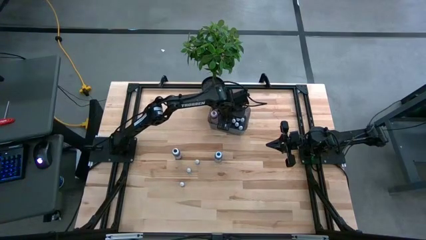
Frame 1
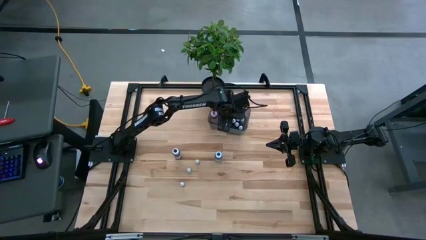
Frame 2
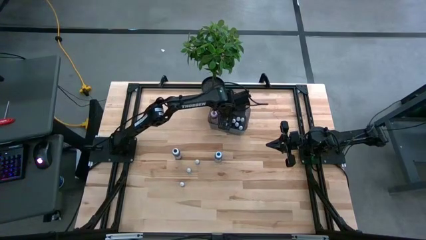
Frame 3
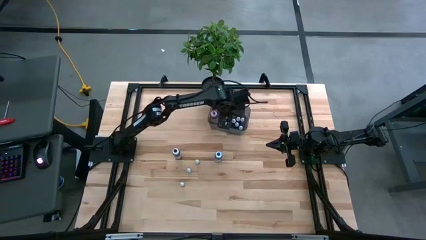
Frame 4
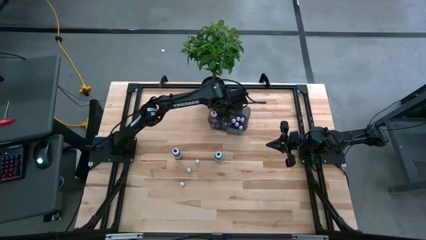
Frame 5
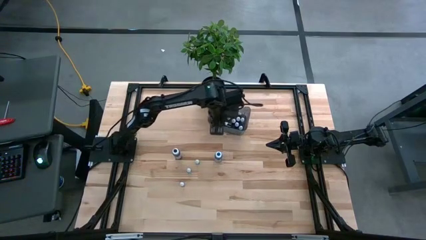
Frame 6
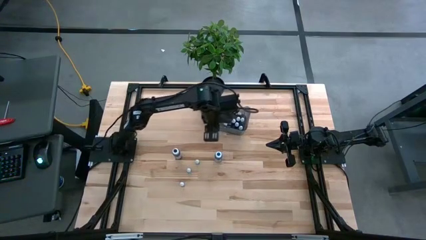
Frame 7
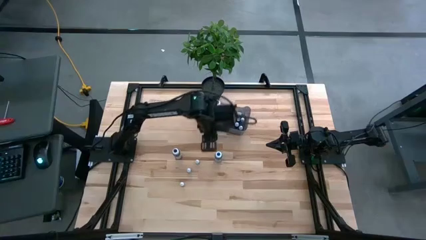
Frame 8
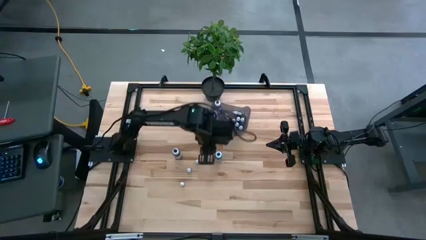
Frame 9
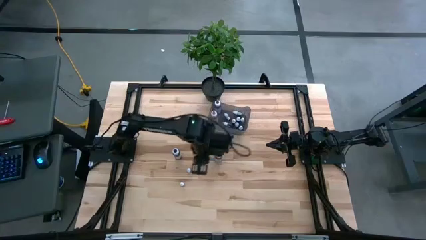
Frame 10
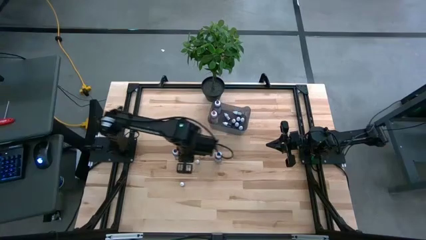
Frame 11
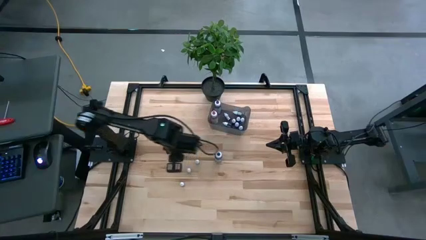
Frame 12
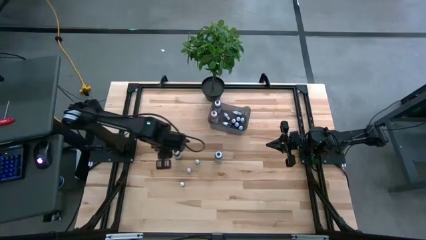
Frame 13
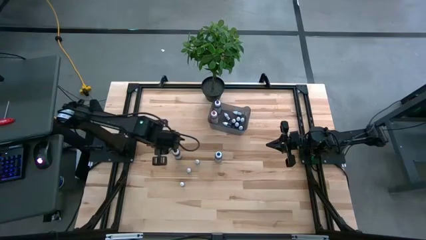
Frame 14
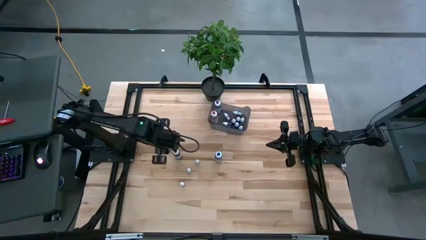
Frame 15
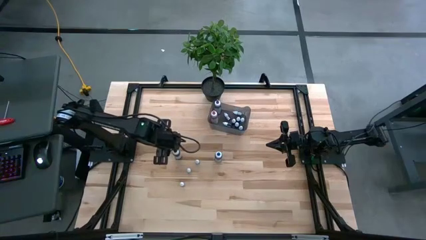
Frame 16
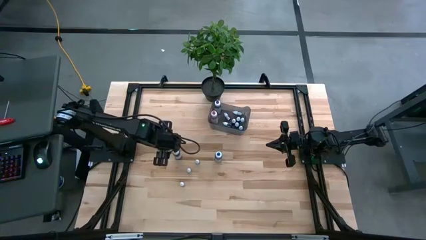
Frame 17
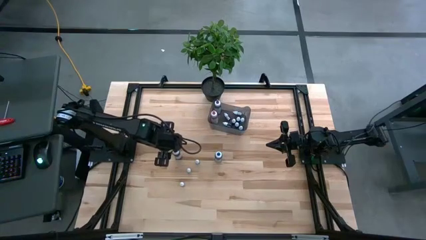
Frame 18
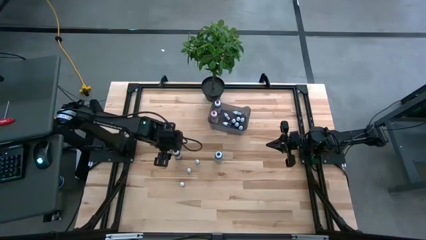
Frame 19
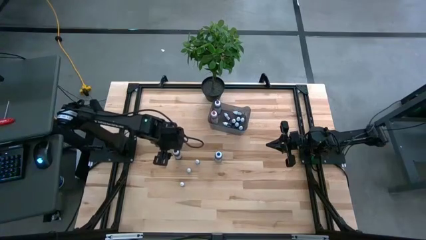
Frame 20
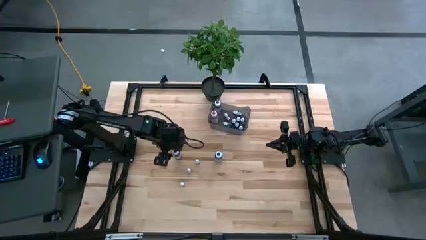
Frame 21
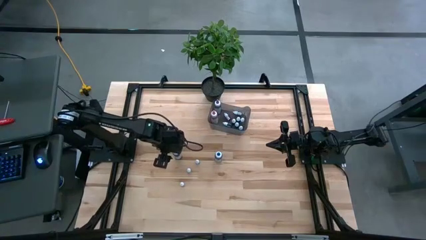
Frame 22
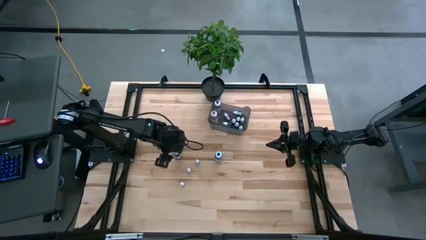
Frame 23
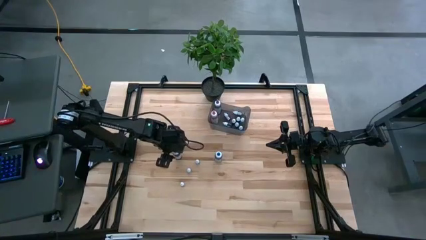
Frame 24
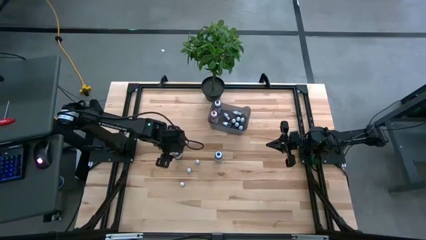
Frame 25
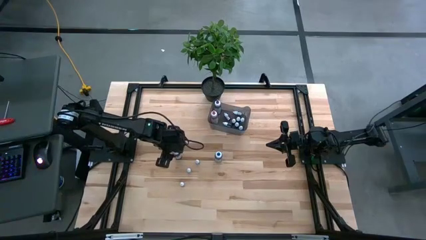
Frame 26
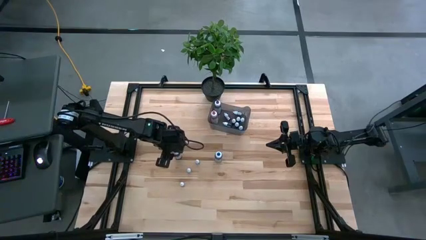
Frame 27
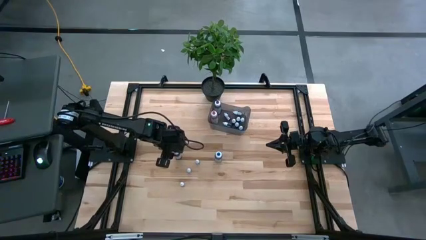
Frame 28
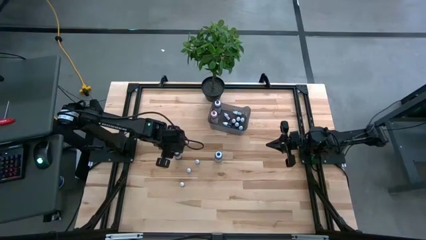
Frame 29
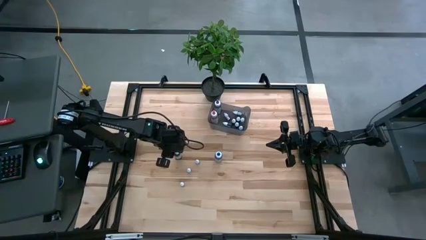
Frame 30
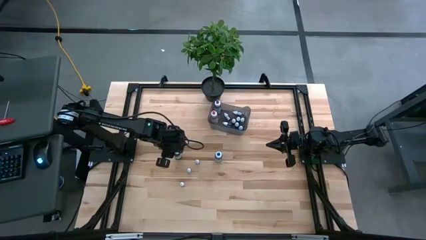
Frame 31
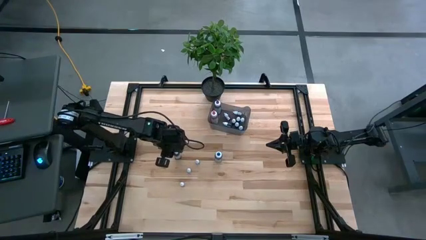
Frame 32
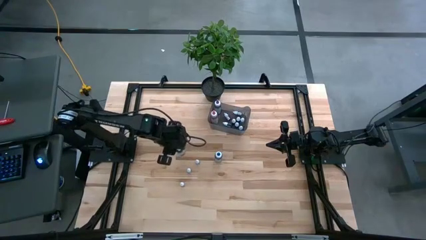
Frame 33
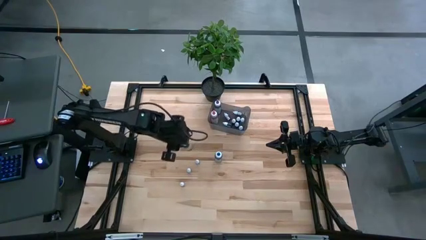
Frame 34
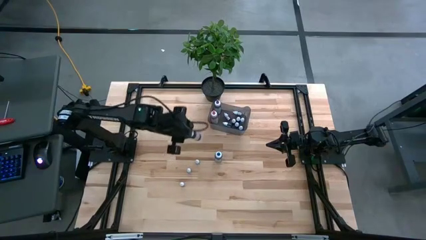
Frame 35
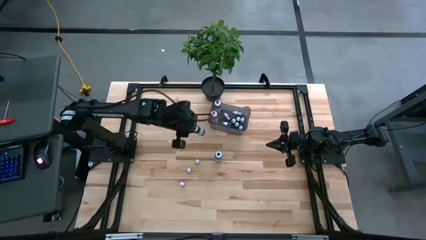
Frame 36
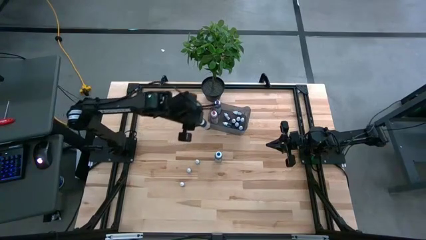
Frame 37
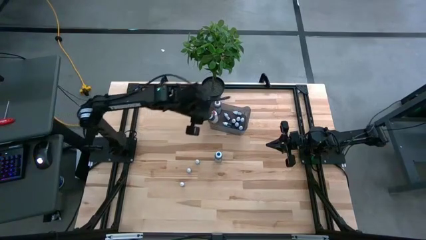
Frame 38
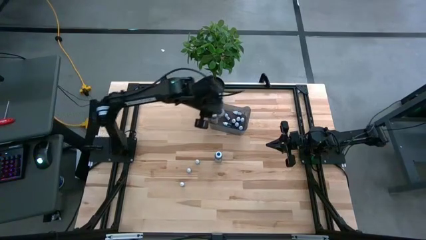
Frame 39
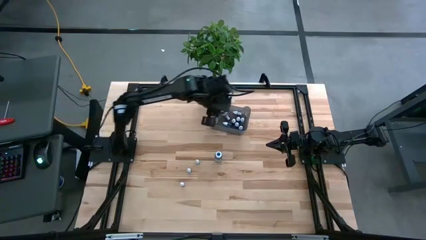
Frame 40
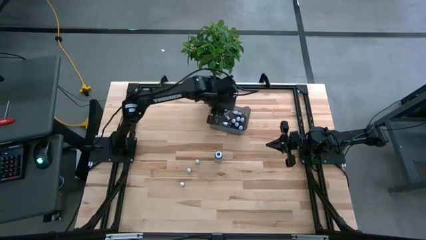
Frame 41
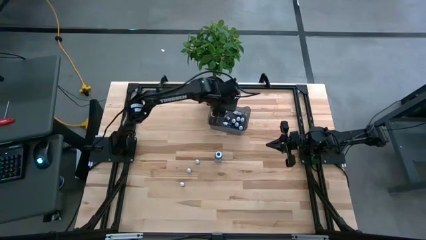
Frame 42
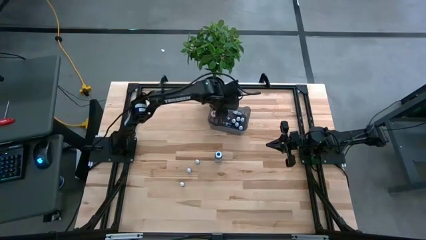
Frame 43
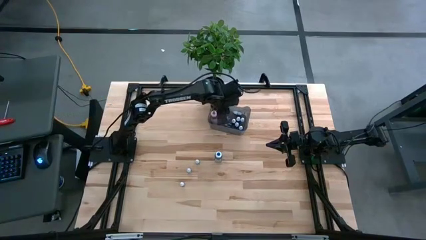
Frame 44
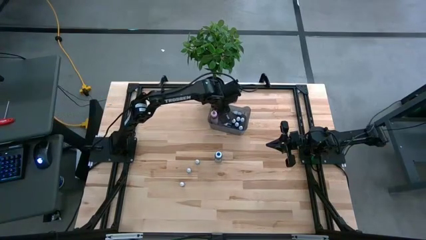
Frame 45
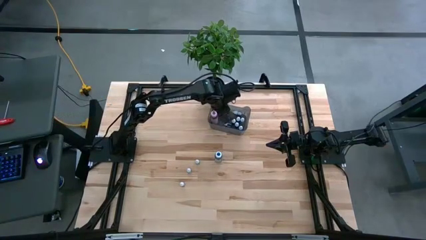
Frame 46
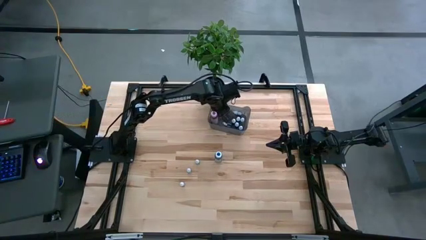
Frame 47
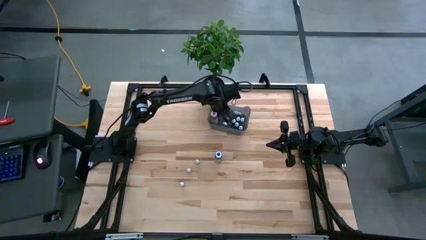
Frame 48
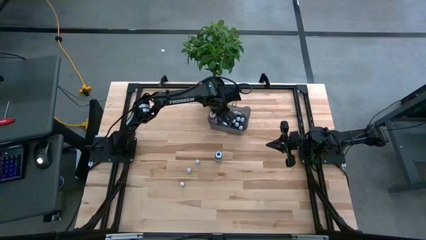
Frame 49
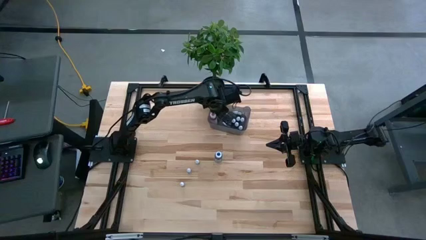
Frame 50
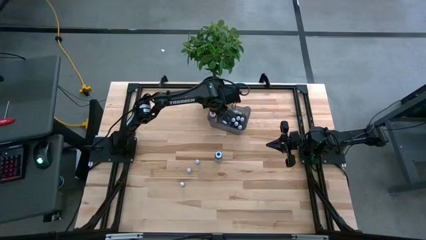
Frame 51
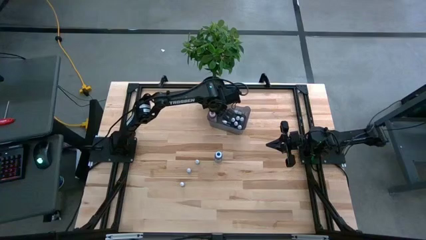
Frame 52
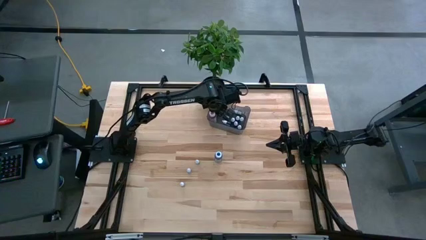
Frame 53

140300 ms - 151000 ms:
Task: Pick & Place food coloring
Put the big black food coloring bottle into the black bin

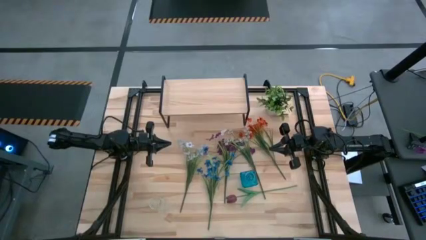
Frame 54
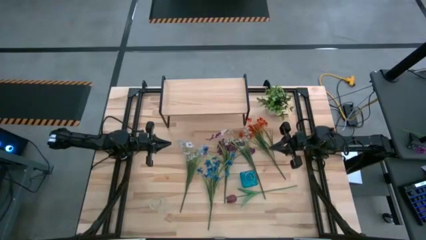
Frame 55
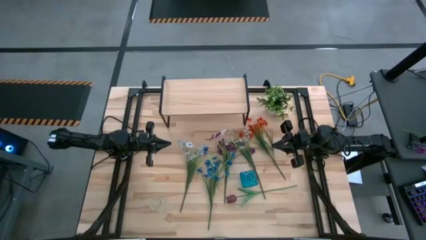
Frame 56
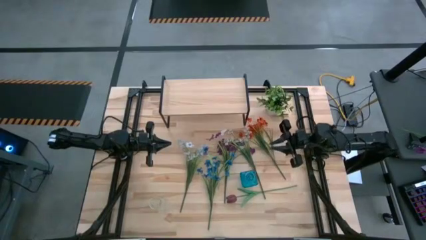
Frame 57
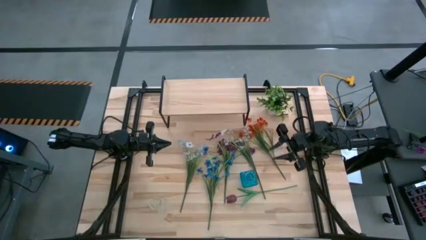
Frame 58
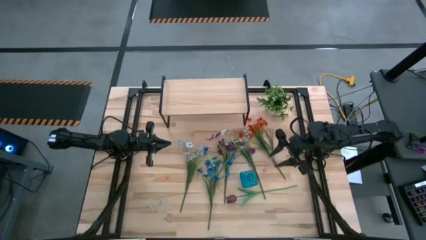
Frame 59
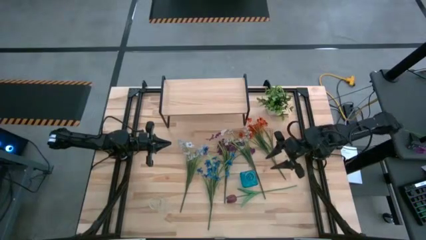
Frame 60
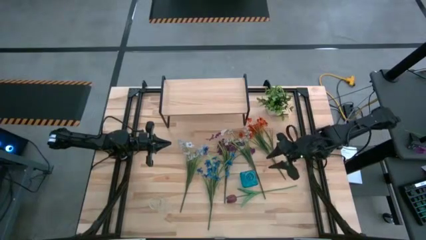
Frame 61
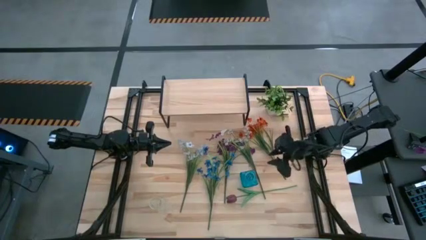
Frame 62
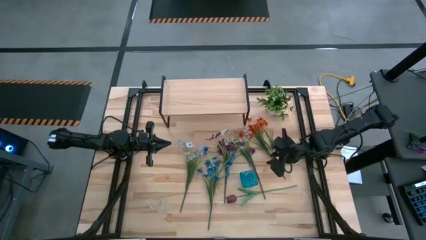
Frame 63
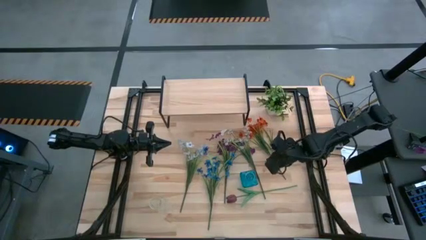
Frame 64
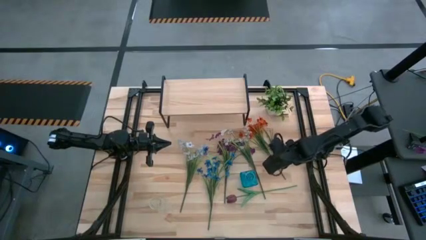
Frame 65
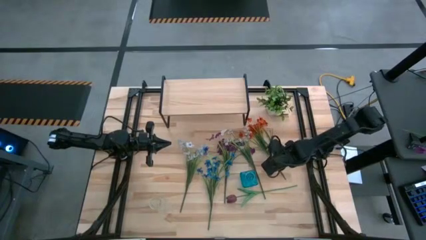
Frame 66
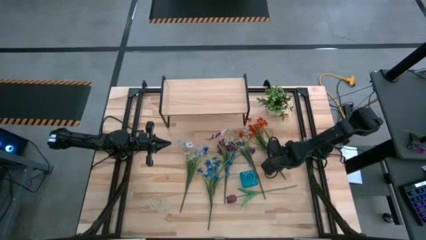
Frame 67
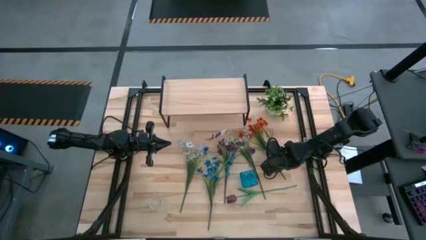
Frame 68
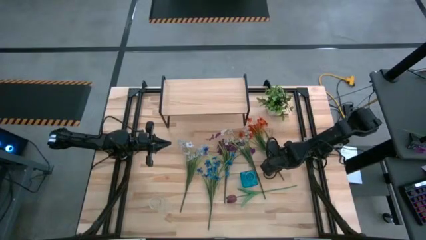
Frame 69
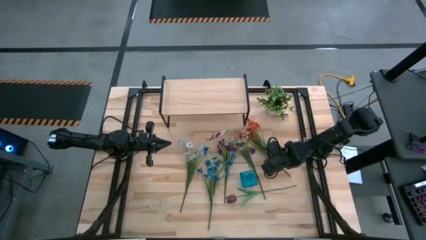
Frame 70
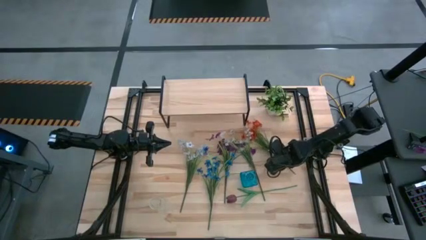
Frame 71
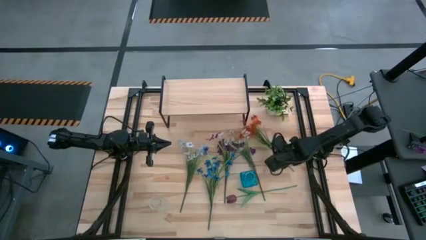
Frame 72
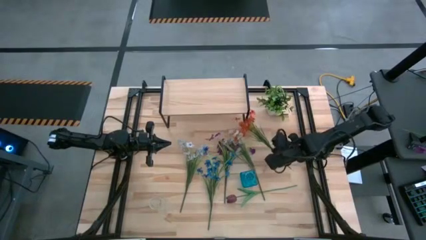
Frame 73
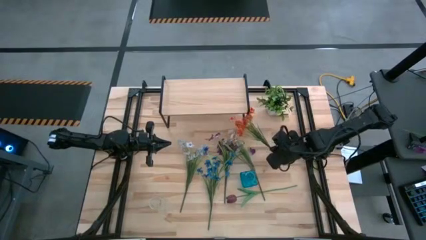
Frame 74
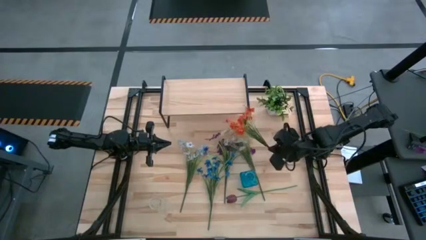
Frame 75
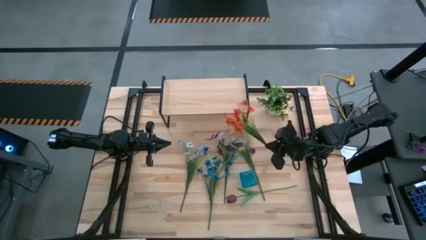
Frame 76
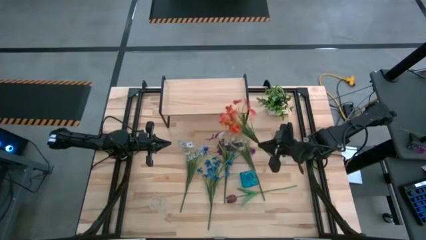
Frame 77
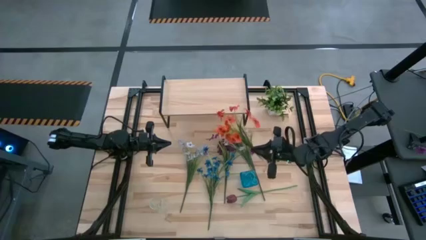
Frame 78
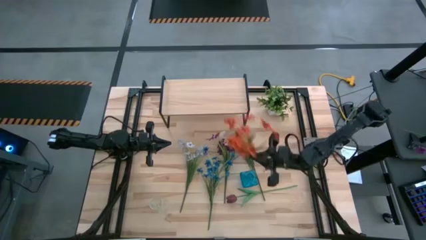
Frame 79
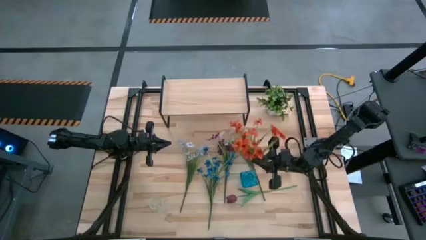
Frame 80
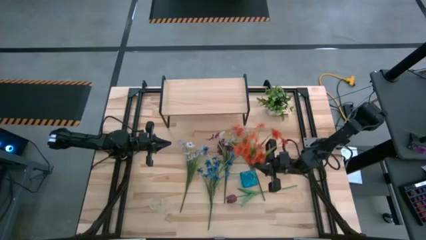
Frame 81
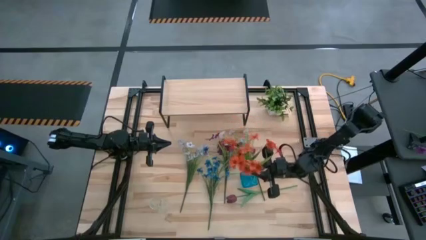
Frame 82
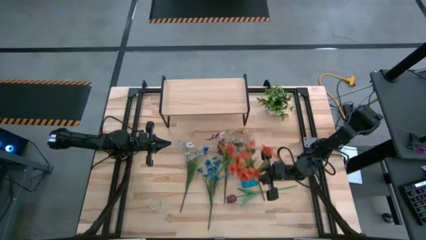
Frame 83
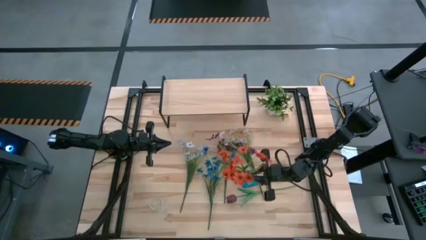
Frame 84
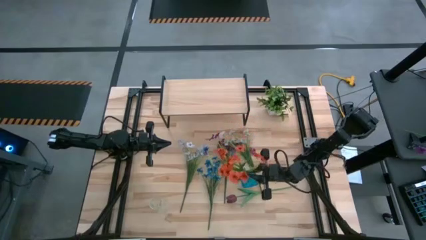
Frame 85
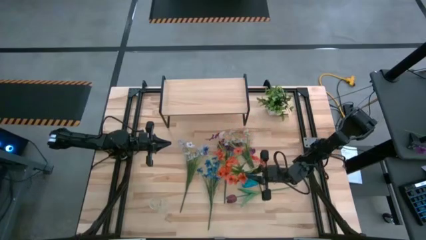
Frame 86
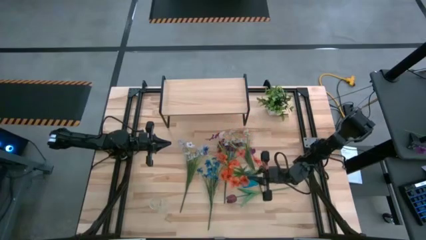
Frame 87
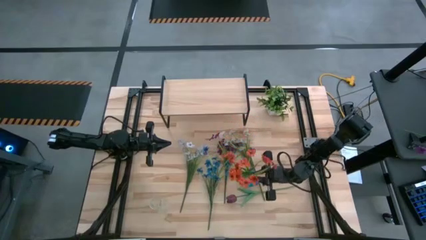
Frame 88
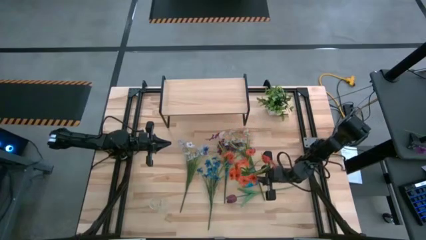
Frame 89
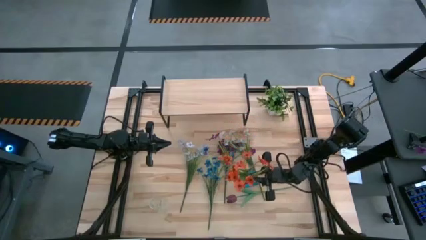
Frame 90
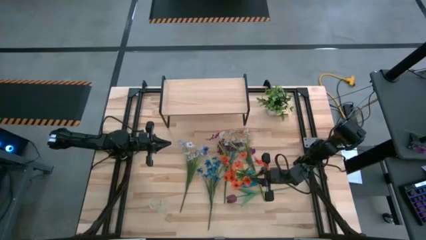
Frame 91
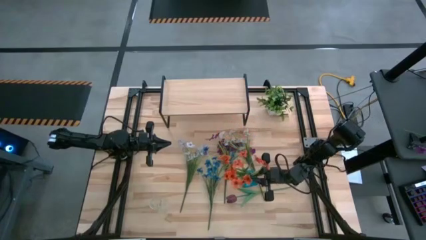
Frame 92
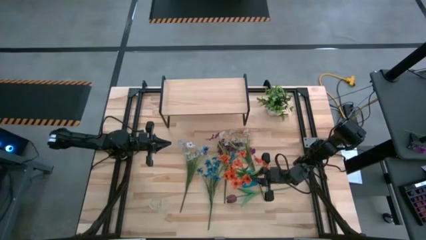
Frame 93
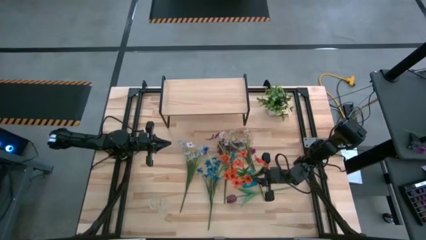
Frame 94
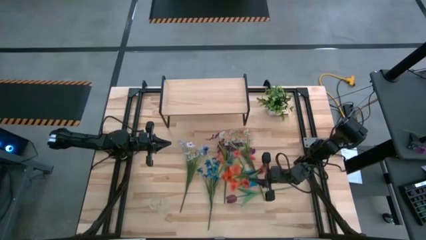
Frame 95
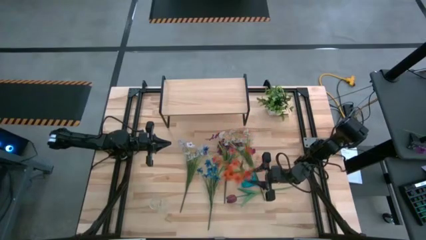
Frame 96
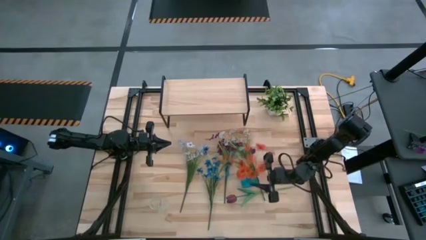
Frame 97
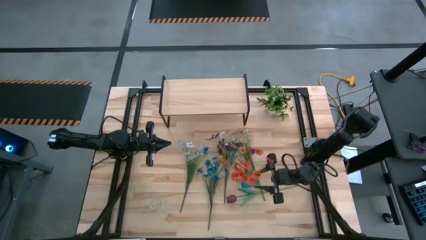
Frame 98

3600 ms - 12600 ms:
Task: Pick and place flowers into a vace then onto a shelf
Put the orange flowers into the blue vase
